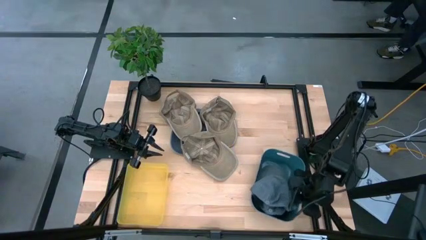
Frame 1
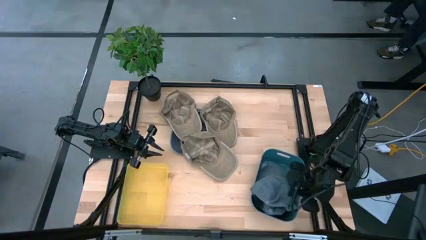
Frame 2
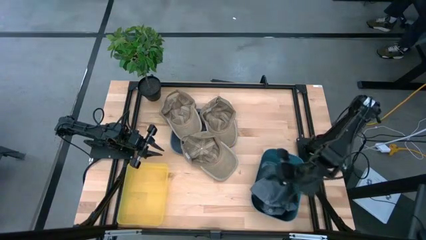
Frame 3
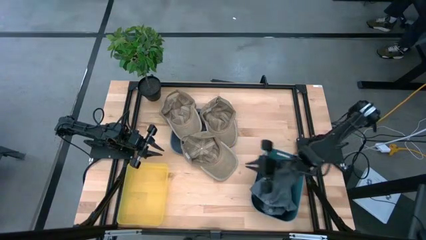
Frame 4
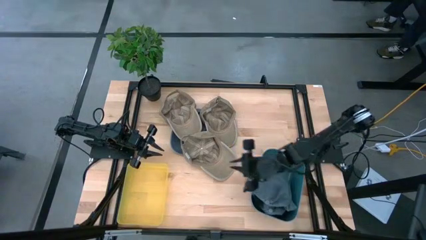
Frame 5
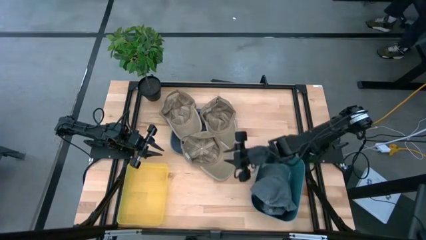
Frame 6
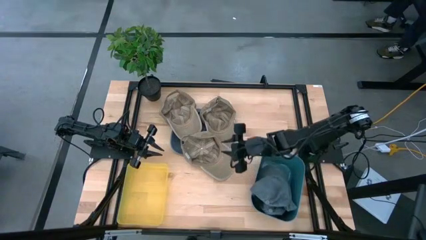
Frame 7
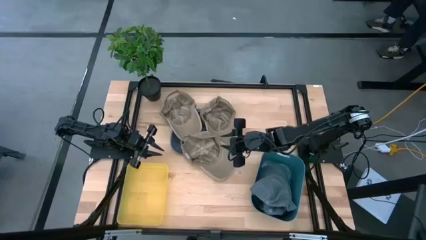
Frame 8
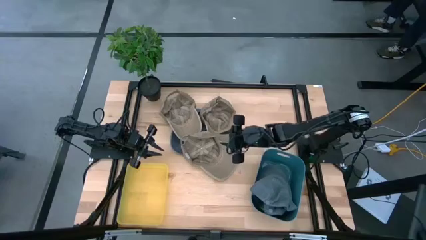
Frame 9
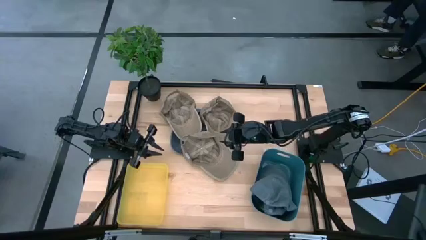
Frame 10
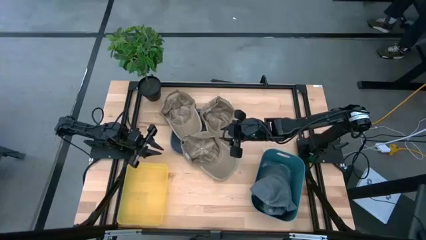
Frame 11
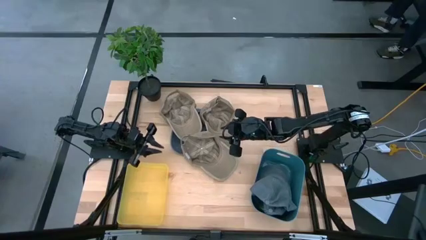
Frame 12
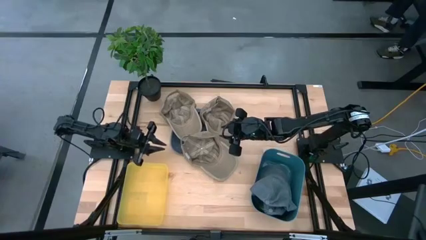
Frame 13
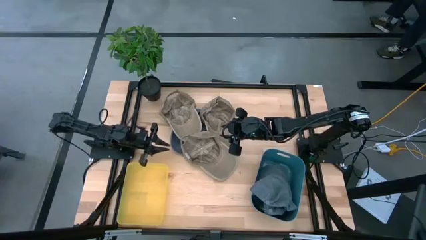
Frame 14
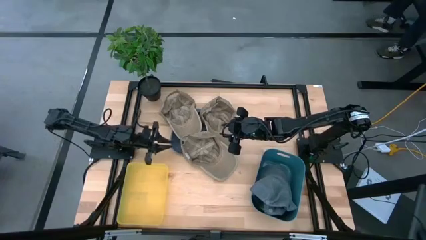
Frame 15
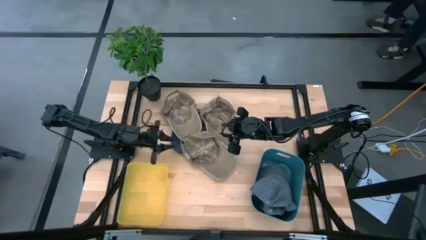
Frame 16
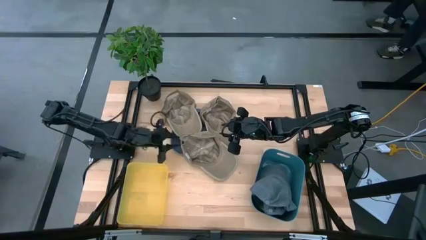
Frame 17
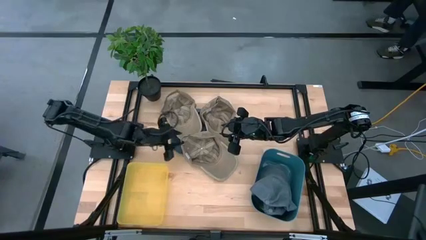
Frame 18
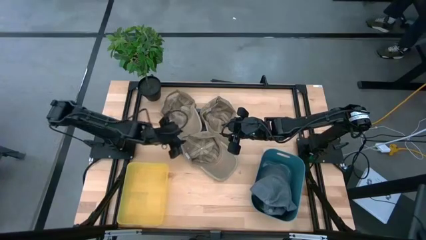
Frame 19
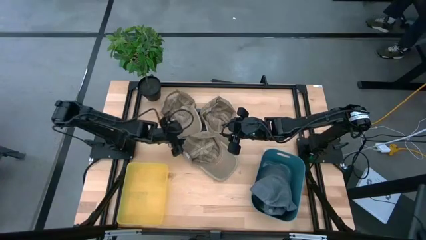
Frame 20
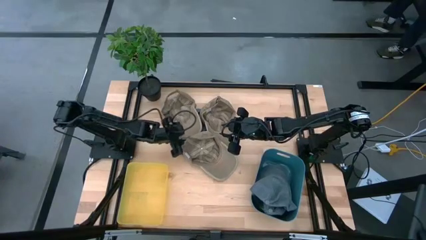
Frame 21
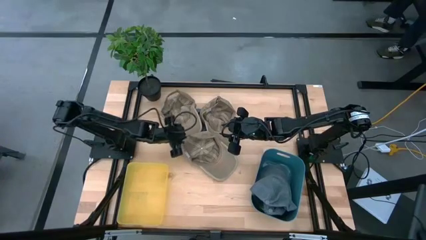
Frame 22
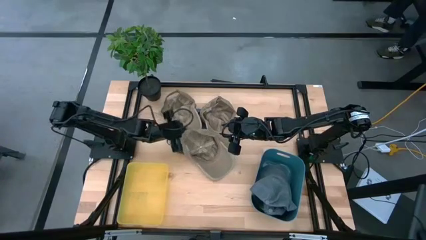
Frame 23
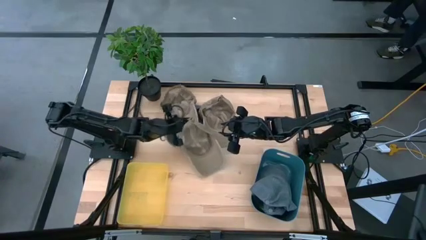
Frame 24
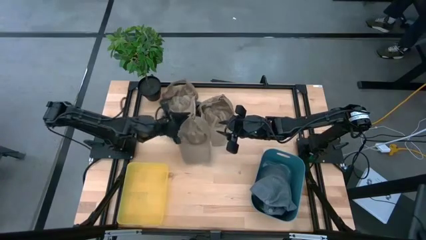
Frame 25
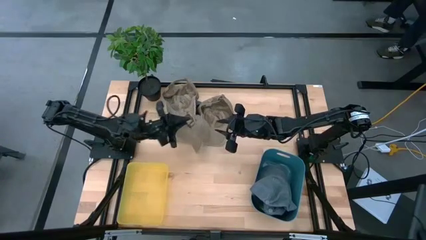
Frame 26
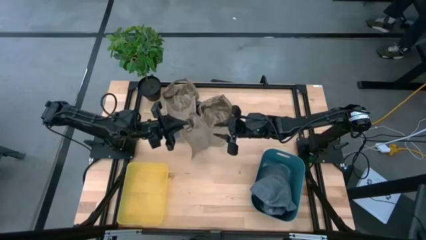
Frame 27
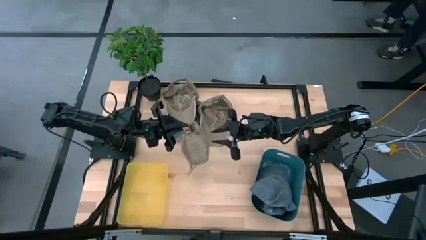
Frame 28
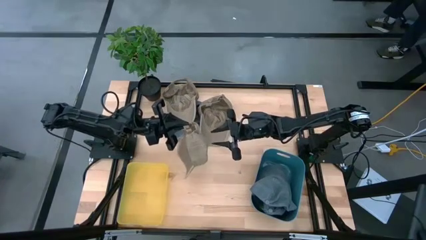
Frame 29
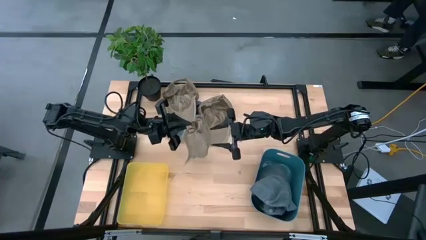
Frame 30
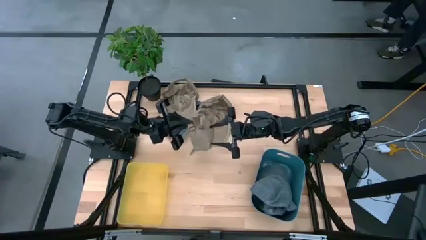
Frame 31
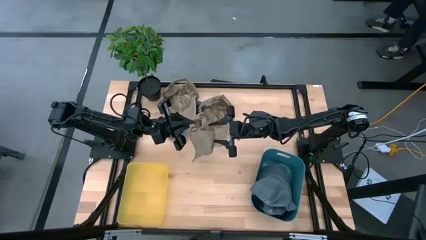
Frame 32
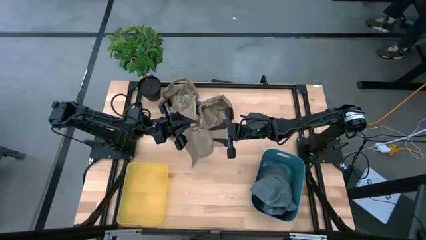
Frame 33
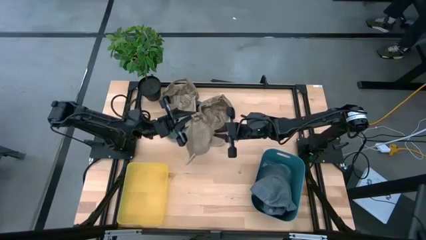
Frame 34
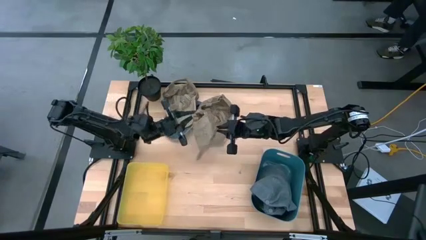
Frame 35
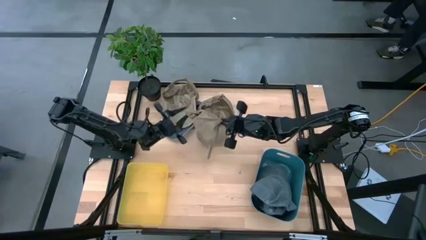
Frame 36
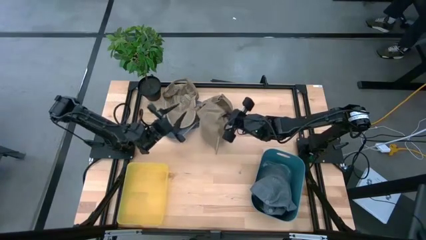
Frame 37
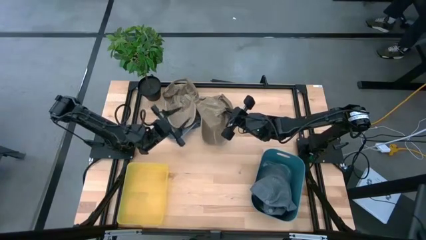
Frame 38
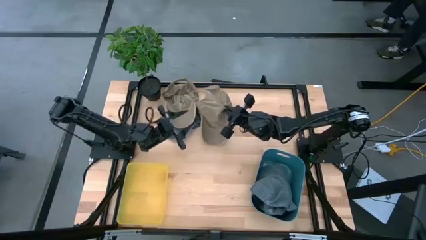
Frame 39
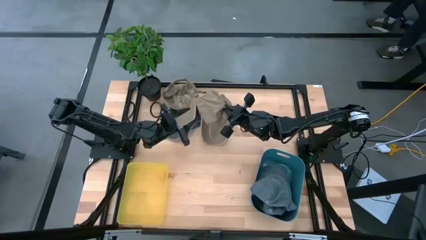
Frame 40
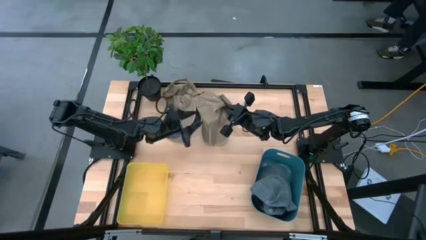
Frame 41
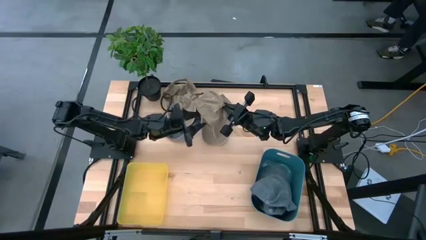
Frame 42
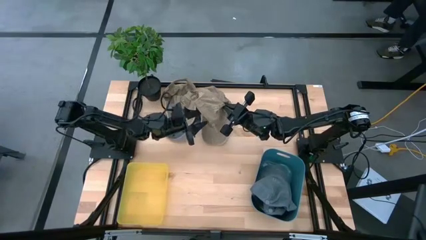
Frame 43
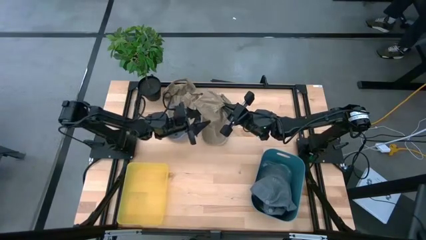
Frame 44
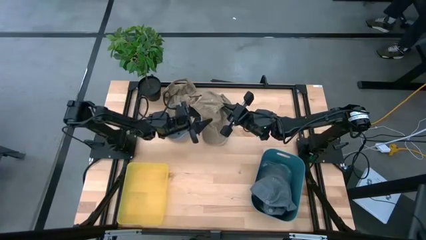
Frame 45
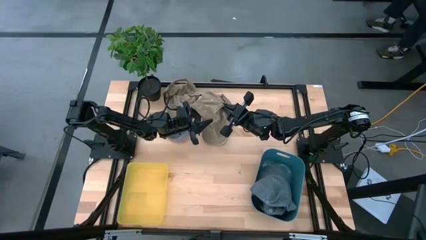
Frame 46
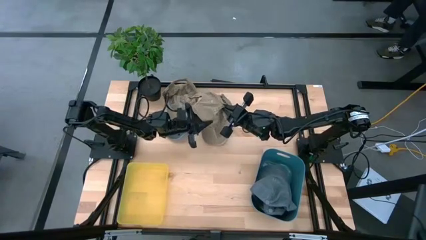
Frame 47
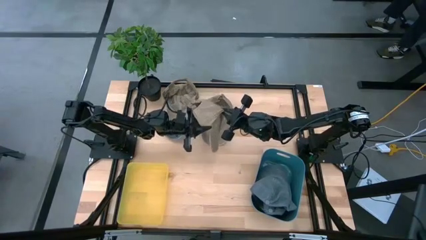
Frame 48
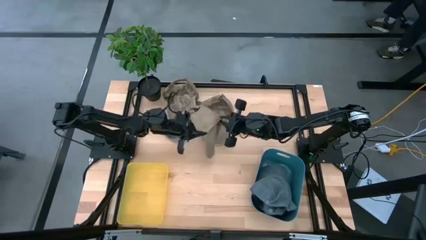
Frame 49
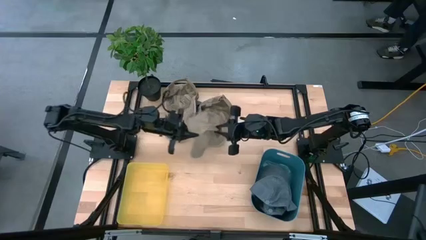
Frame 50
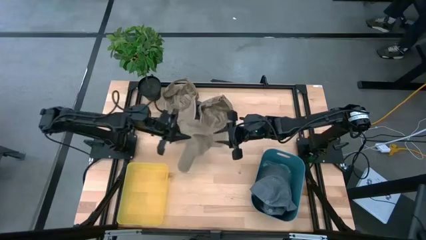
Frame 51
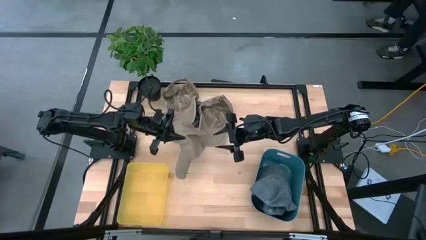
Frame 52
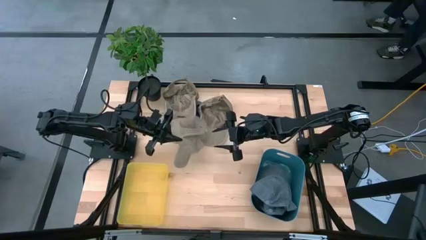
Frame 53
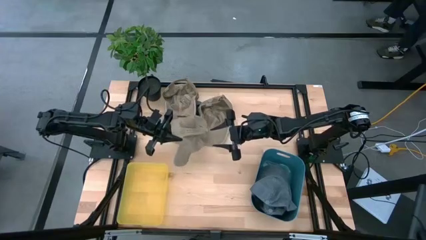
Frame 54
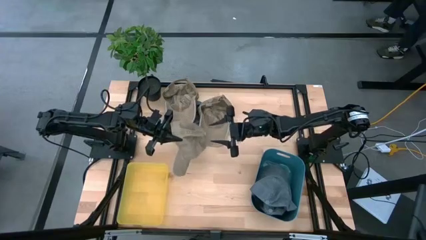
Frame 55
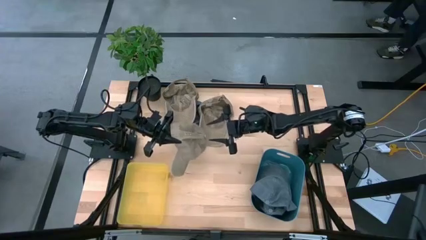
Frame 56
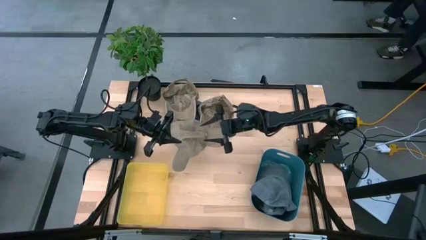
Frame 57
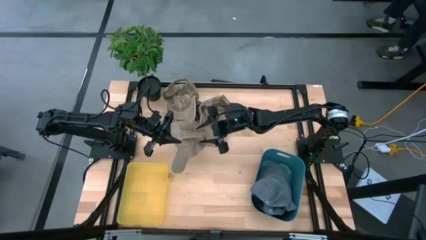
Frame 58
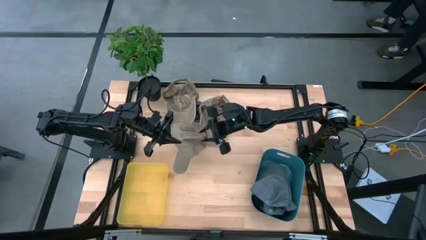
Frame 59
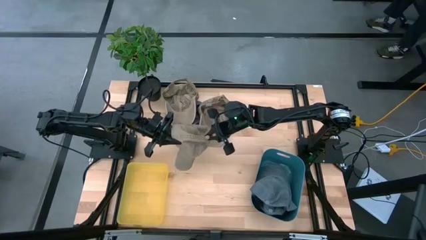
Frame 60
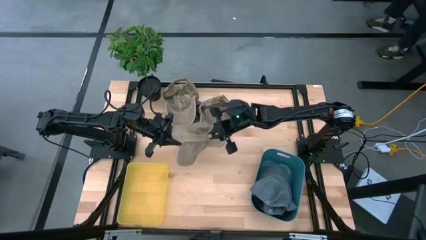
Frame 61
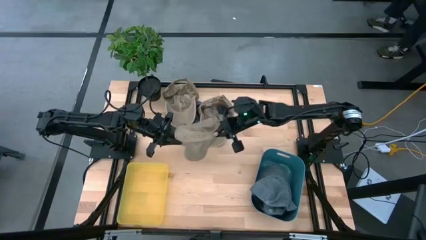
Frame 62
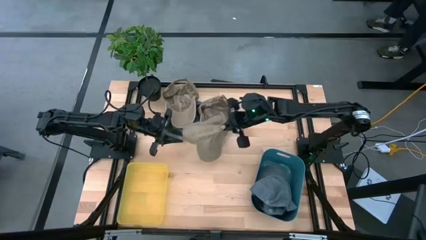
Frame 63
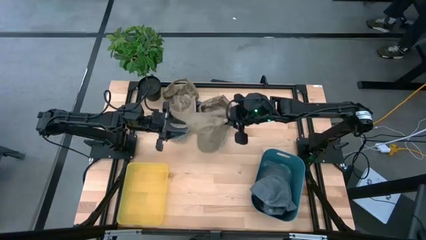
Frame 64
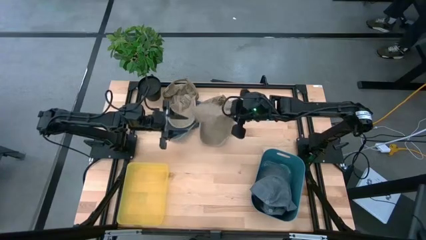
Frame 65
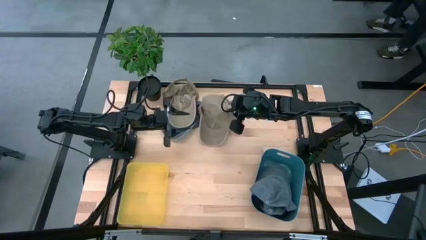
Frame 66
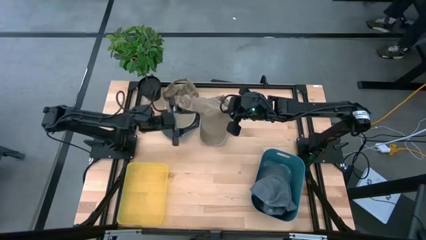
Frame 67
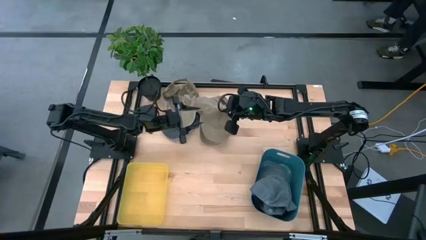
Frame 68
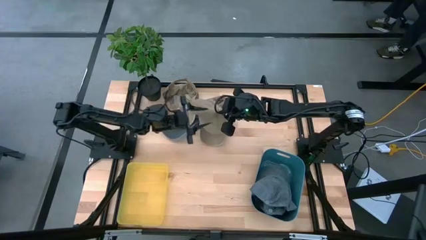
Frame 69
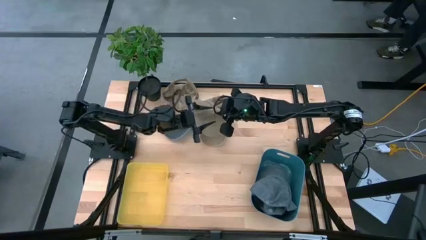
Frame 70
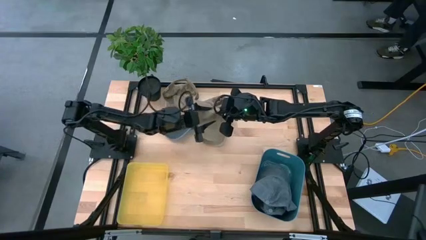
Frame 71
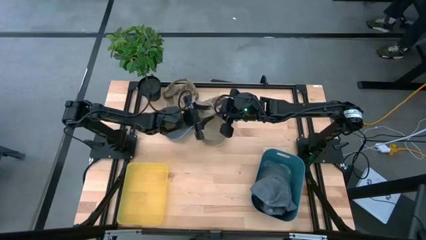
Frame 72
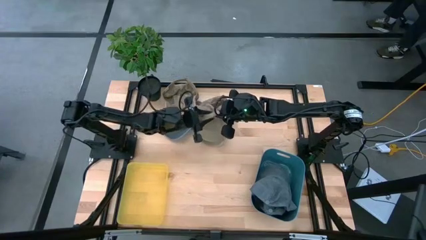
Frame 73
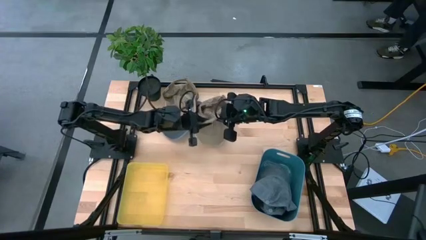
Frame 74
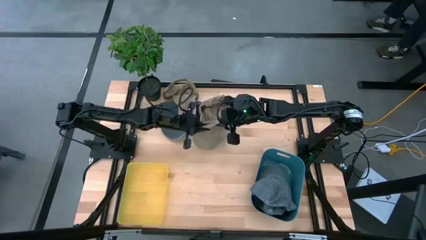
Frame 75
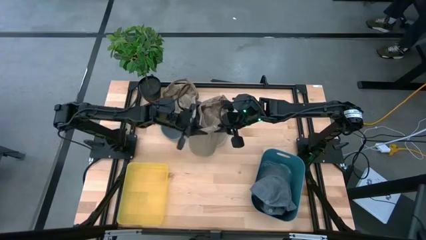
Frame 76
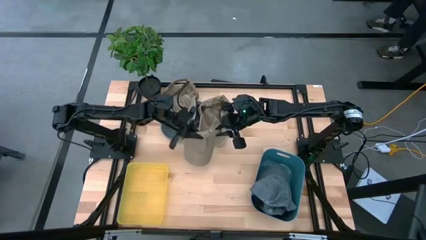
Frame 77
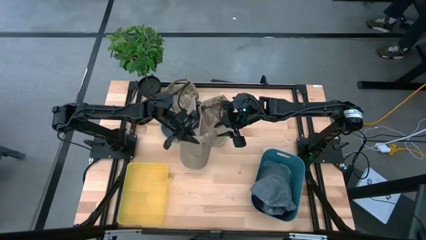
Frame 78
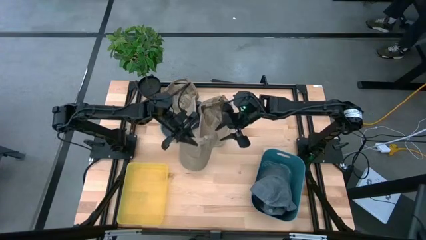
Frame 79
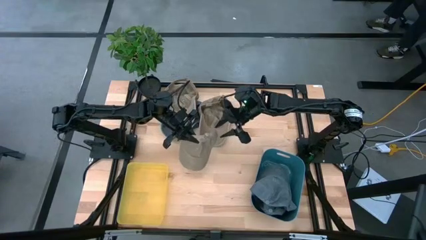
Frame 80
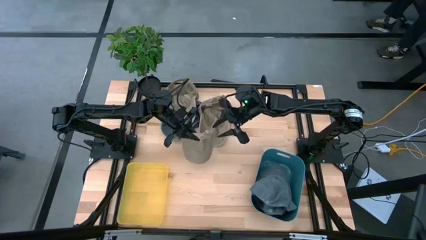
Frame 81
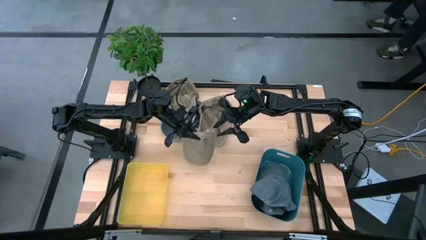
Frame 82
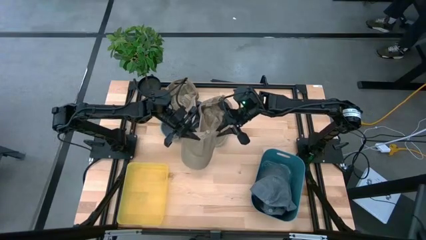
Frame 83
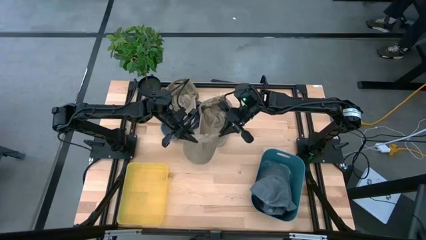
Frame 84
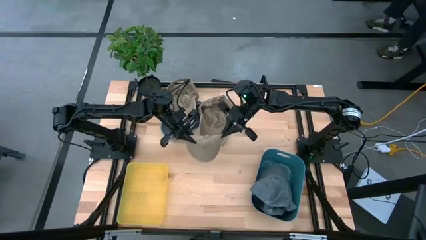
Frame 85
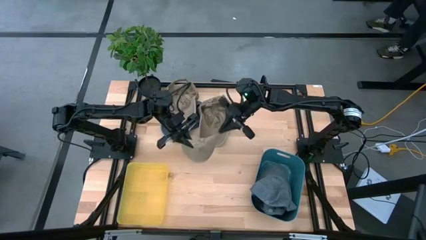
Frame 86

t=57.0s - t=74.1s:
Task: Pick & Place hat
Put the bottom brown cap into the yellow bin
